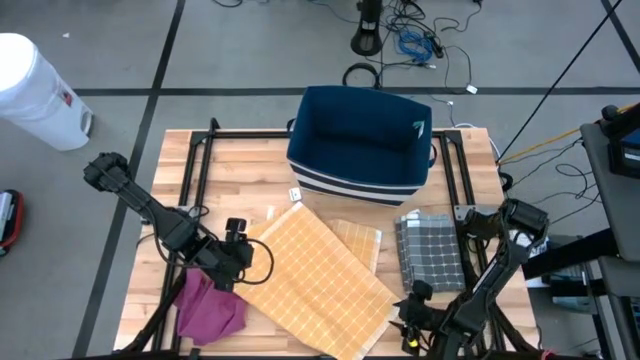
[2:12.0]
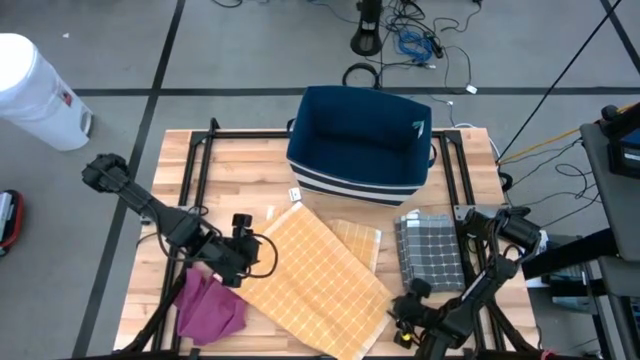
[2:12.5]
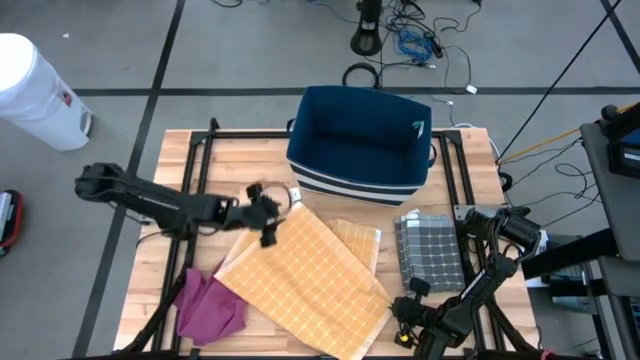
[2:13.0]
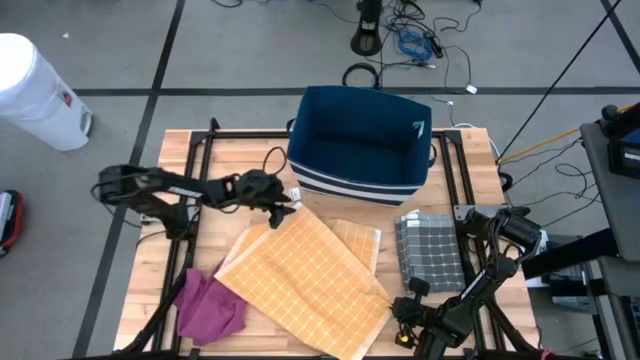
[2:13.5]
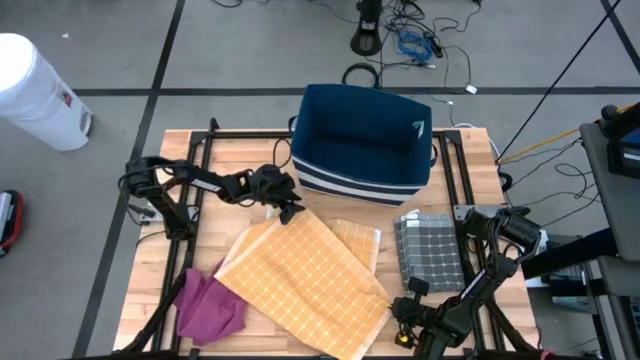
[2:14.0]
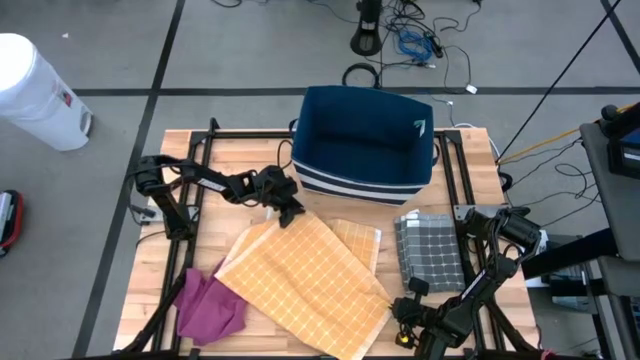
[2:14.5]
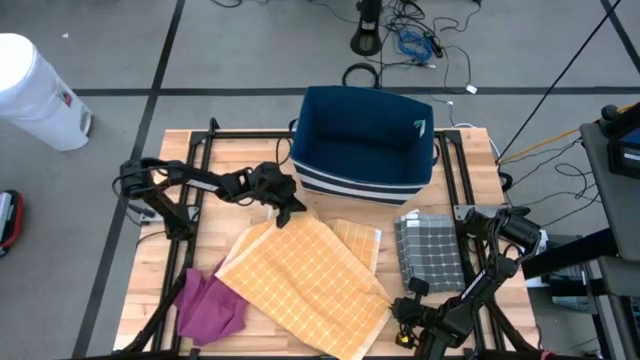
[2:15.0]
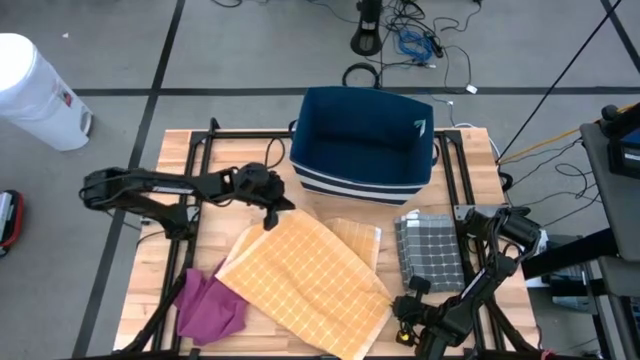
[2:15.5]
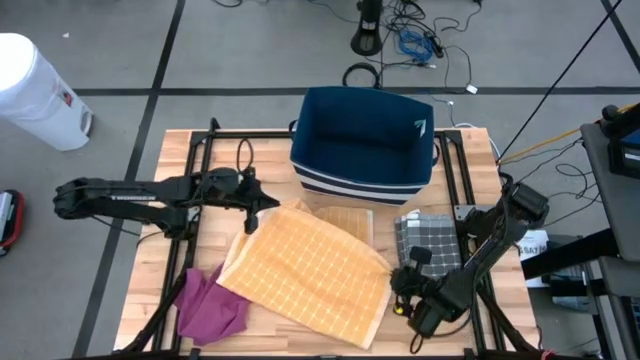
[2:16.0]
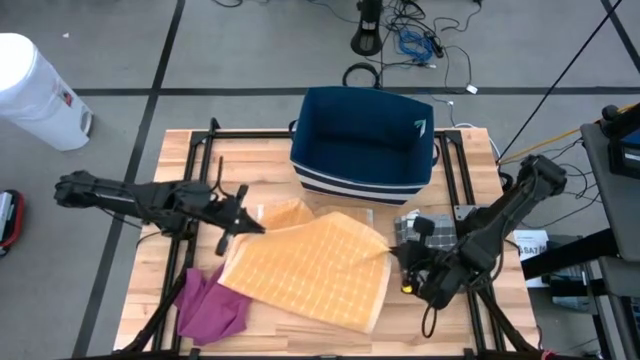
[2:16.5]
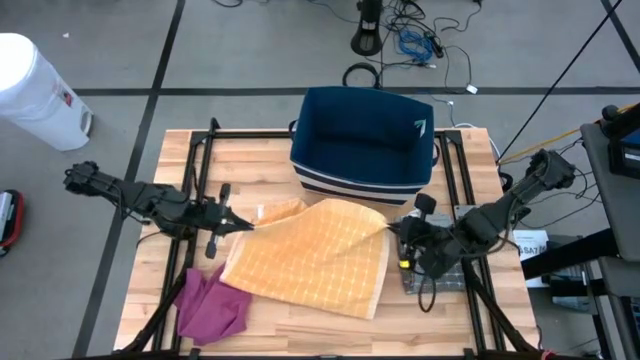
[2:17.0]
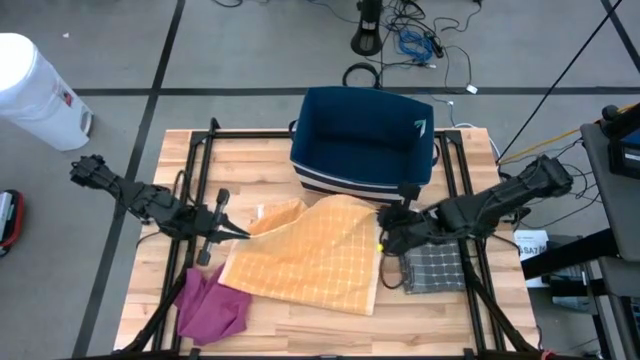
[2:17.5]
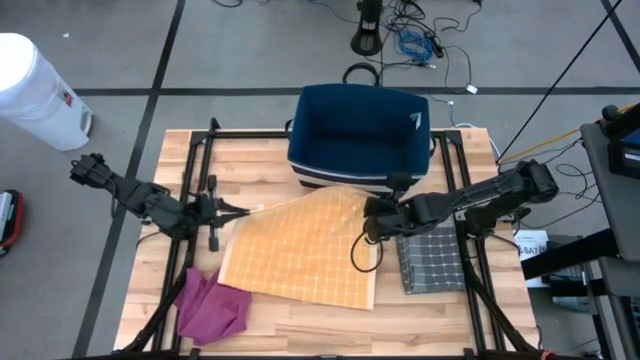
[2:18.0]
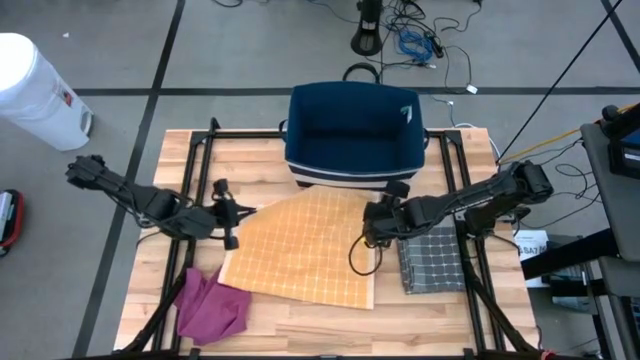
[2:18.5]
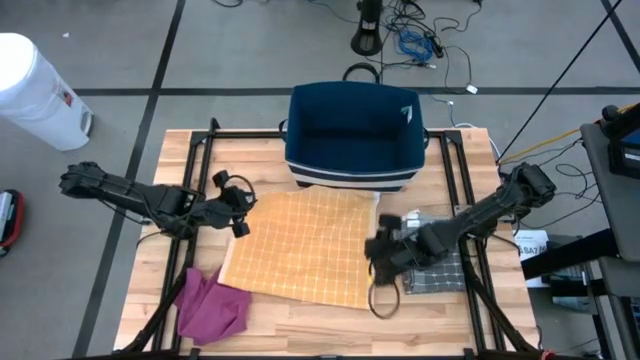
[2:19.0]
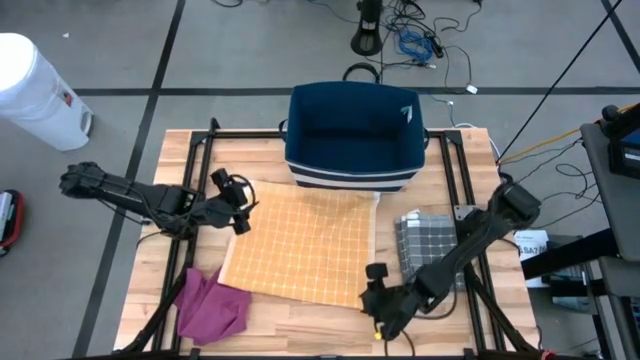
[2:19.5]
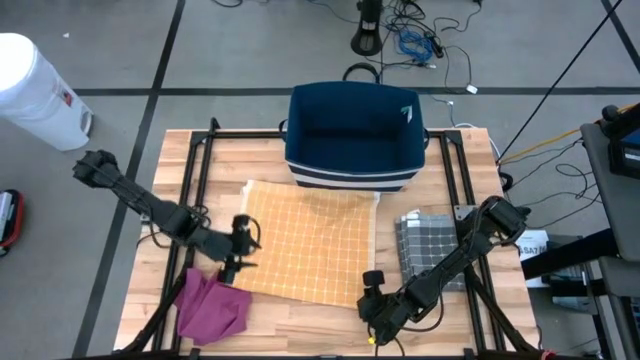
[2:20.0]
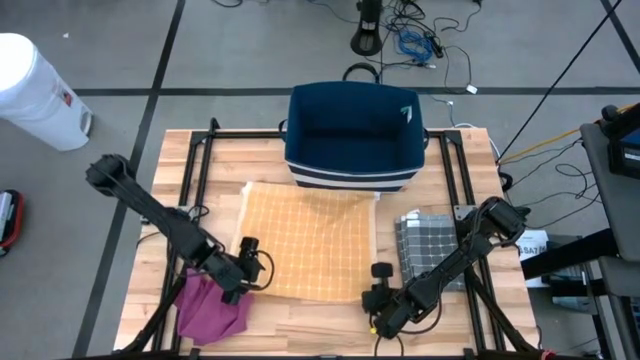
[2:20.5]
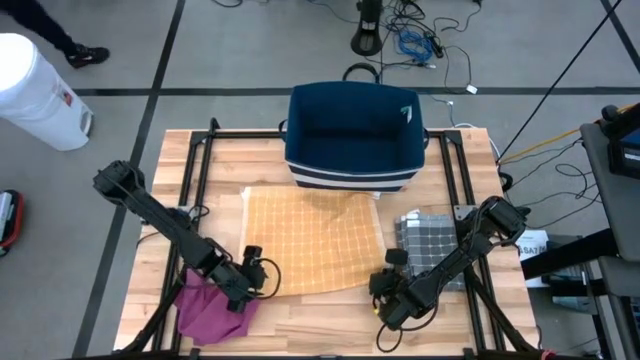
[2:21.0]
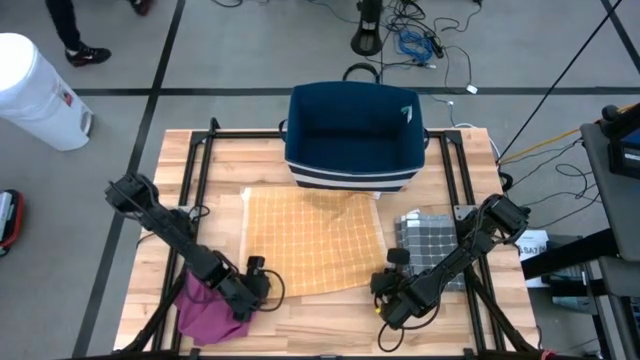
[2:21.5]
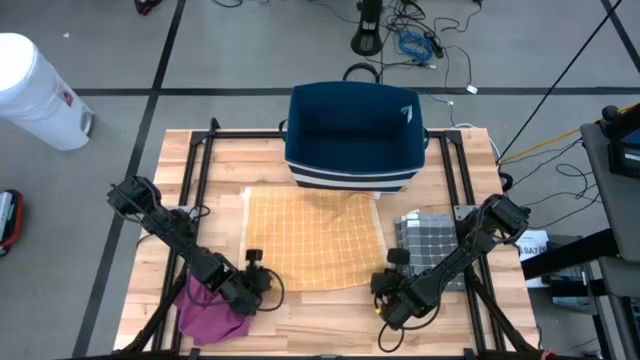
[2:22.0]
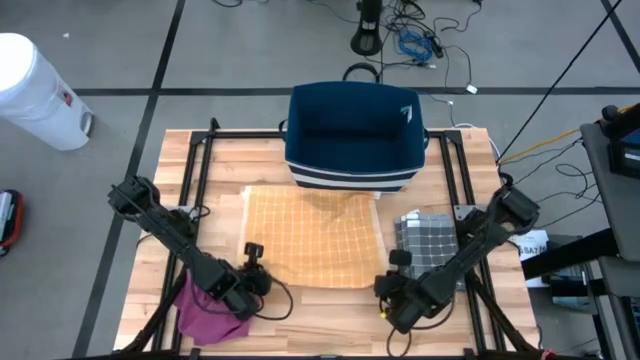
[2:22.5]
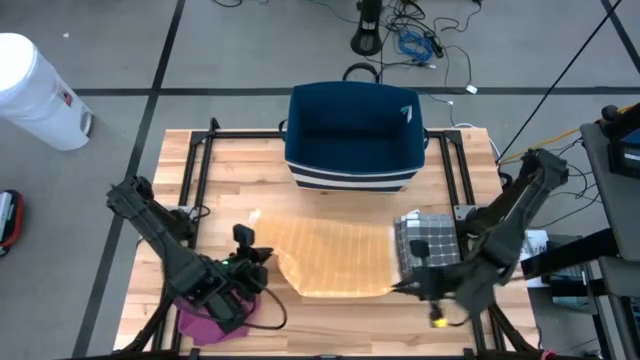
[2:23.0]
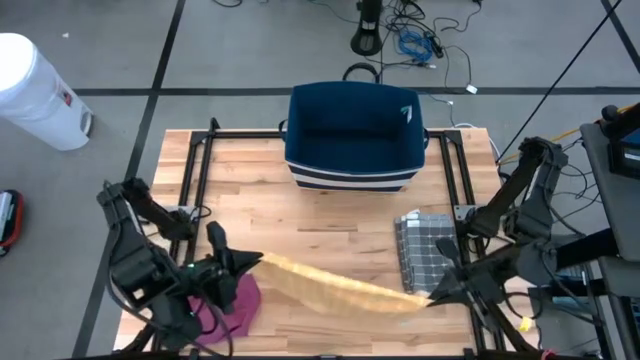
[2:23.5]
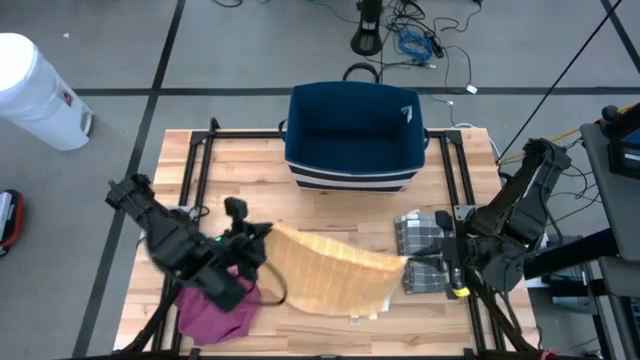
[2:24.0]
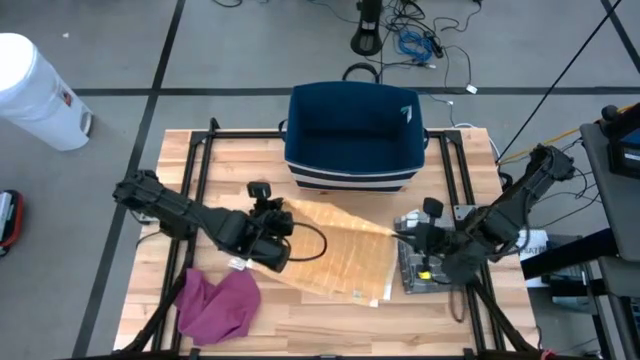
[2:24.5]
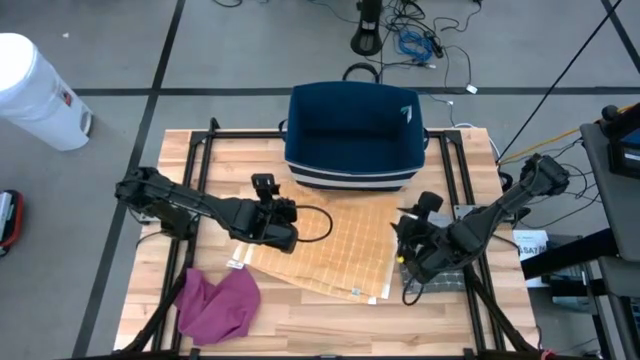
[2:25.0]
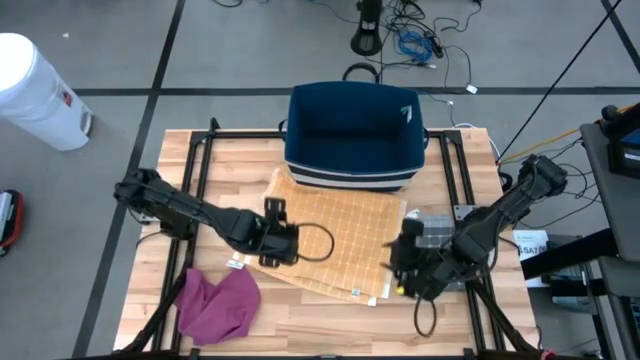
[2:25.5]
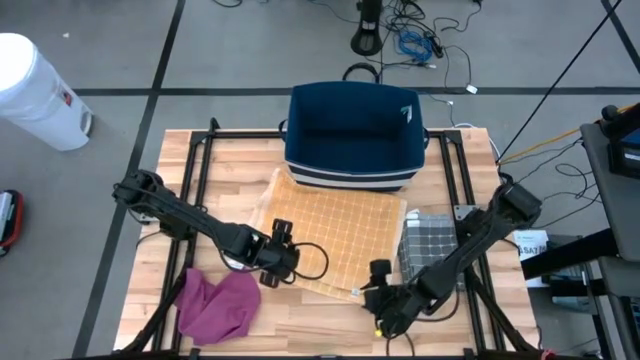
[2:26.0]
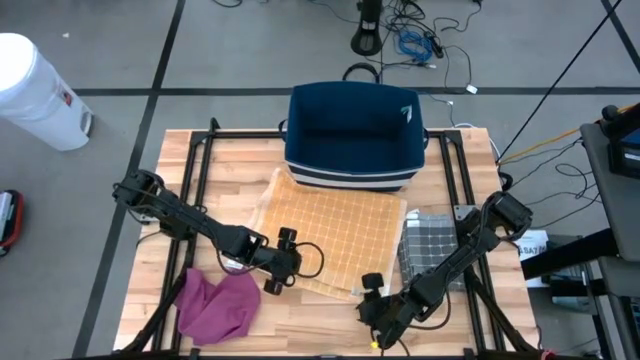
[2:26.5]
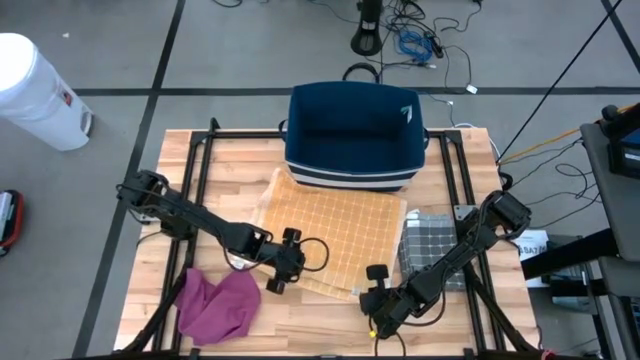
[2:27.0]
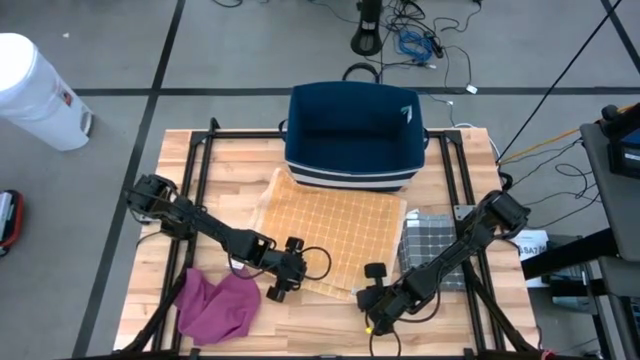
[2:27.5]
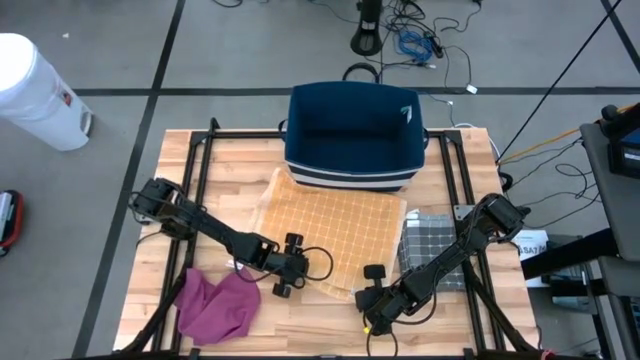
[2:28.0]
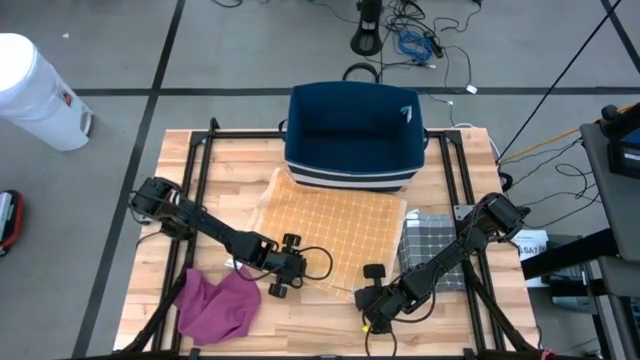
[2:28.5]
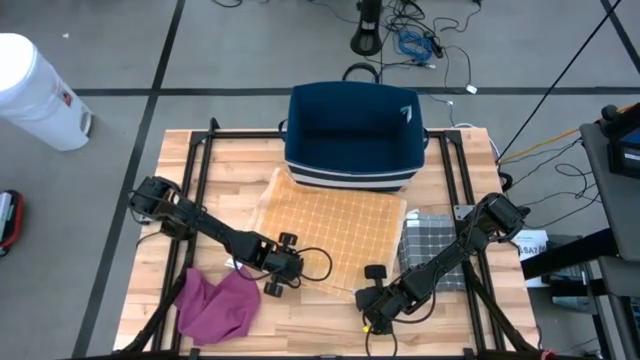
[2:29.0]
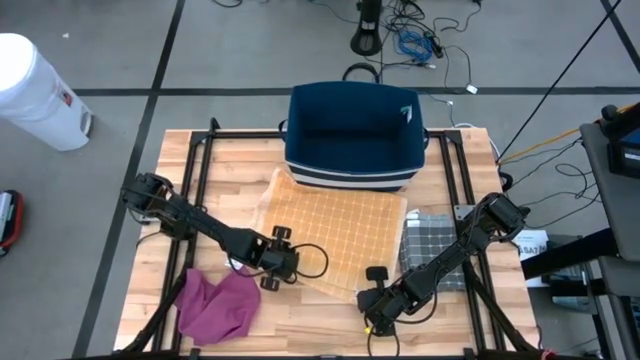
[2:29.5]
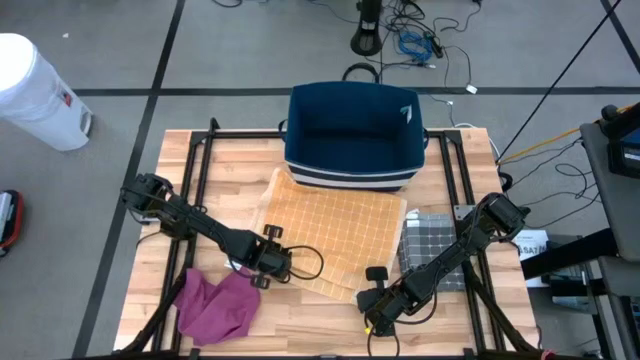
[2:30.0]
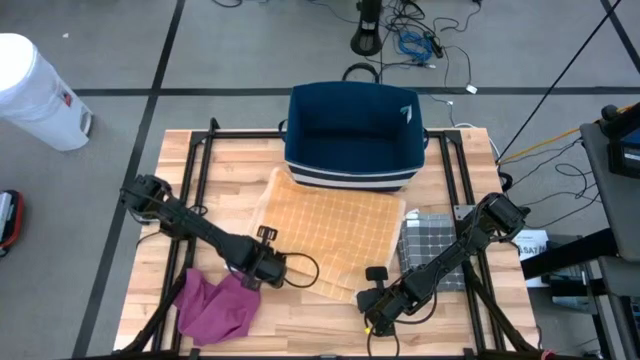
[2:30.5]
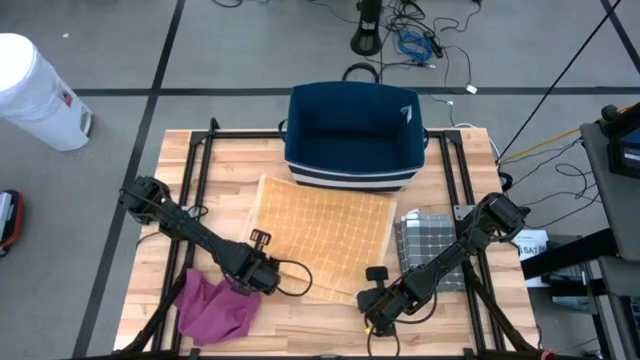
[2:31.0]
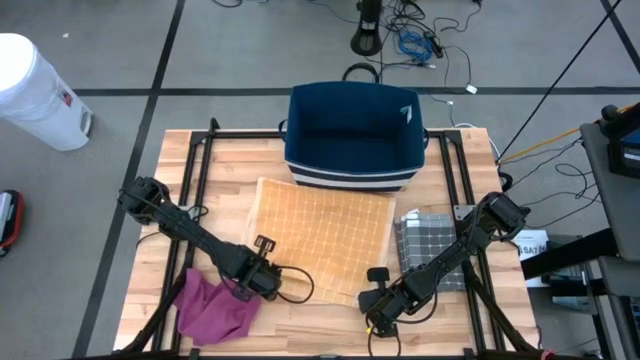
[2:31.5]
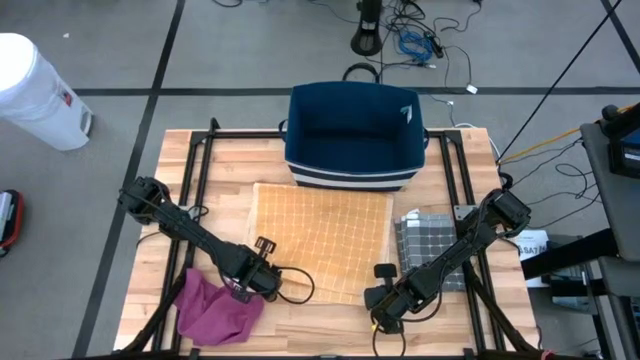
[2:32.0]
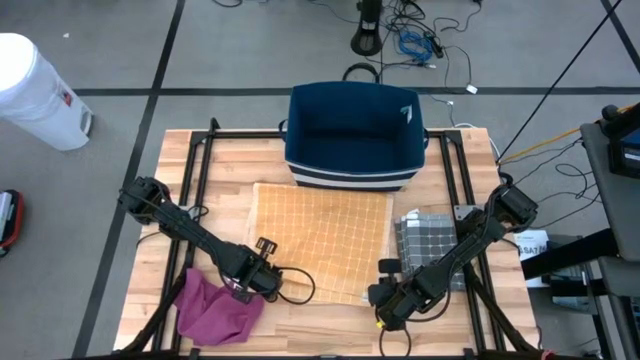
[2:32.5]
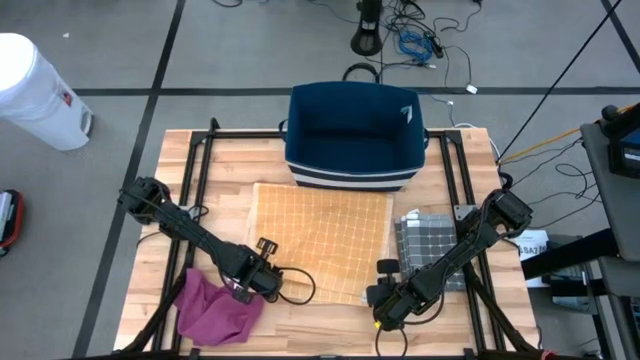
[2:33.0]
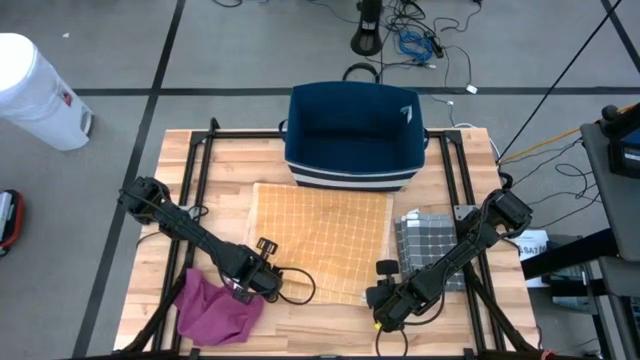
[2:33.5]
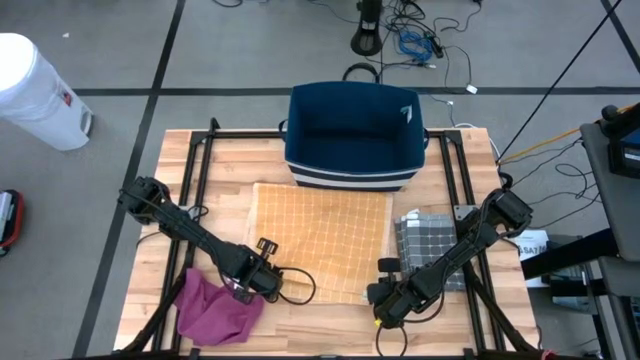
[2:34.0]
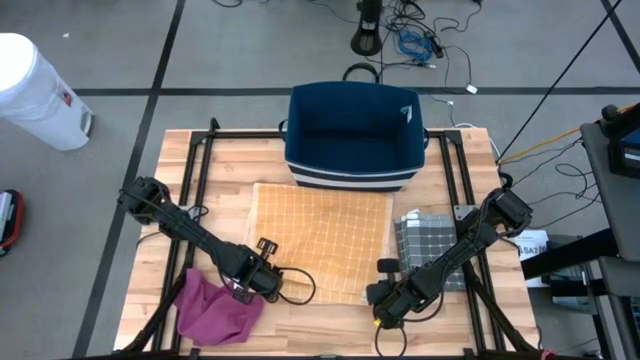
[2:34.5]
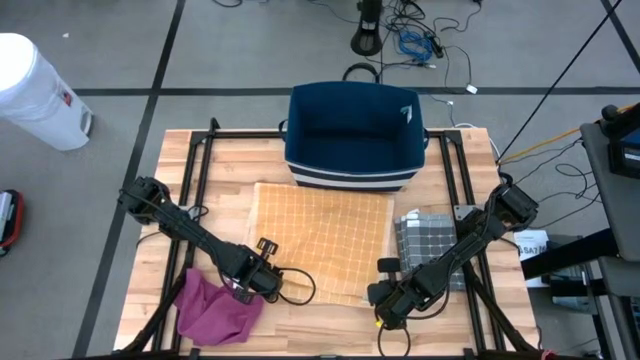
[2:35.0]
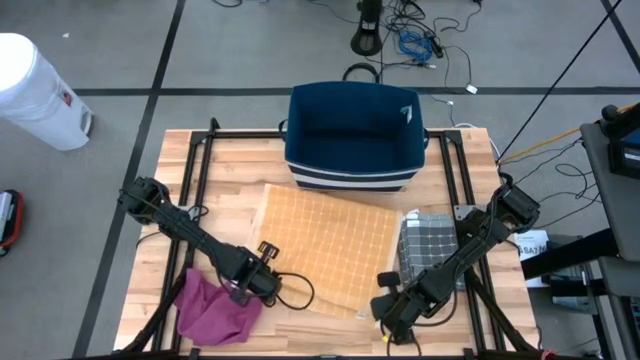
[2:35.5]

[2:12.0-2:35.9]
Task: Fold towel
Fold the orange patterned towel
